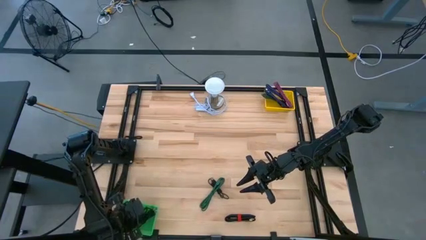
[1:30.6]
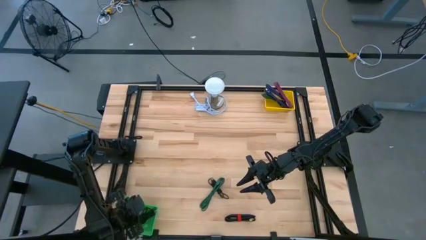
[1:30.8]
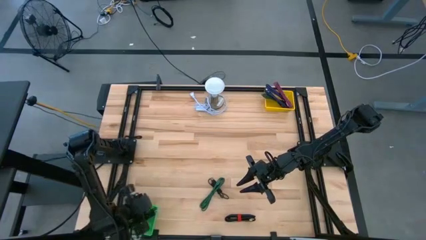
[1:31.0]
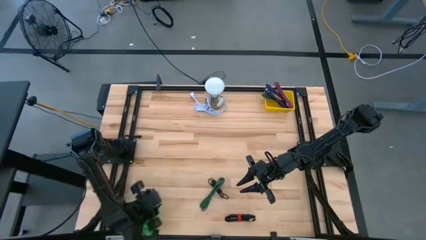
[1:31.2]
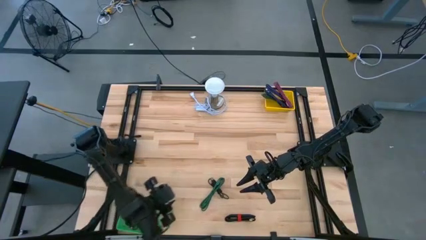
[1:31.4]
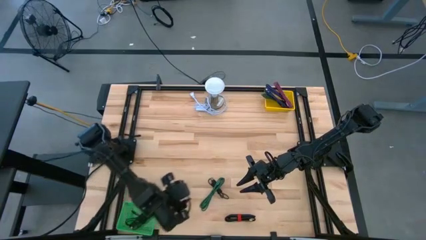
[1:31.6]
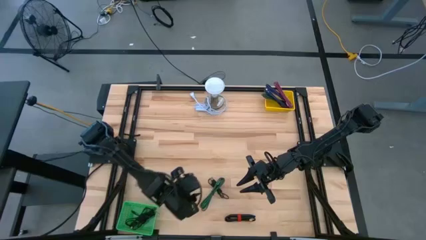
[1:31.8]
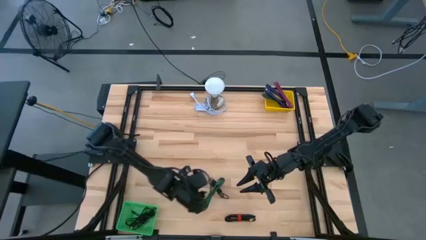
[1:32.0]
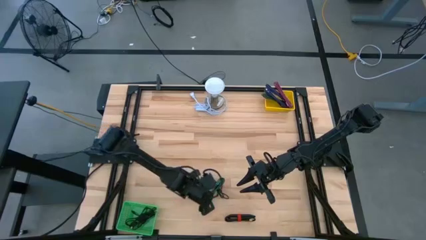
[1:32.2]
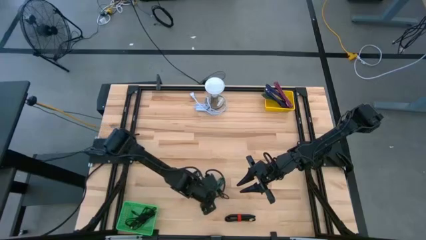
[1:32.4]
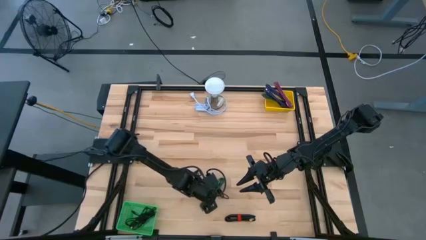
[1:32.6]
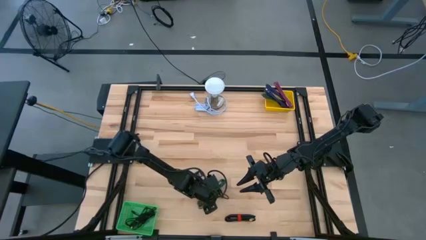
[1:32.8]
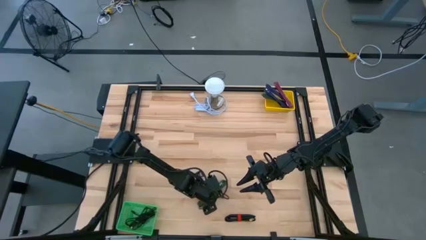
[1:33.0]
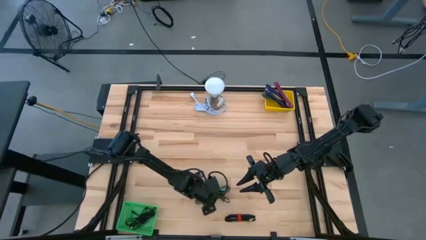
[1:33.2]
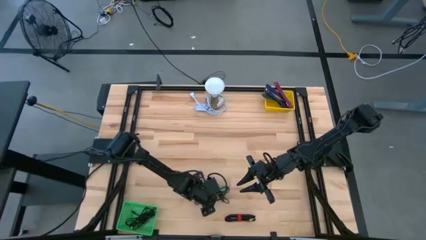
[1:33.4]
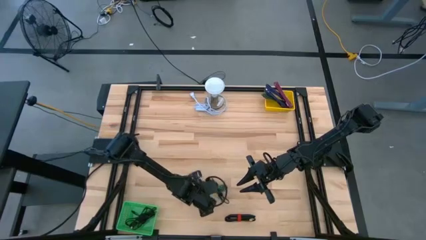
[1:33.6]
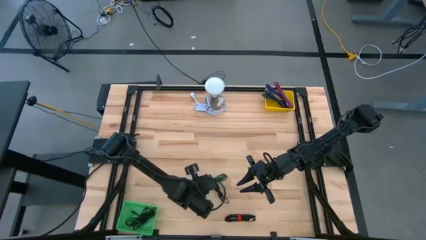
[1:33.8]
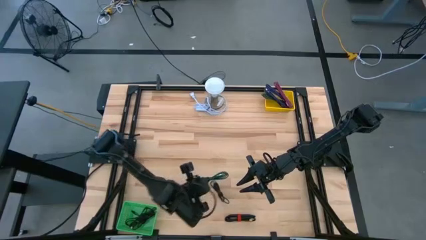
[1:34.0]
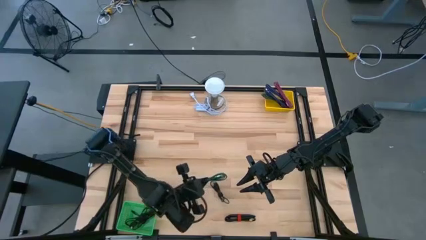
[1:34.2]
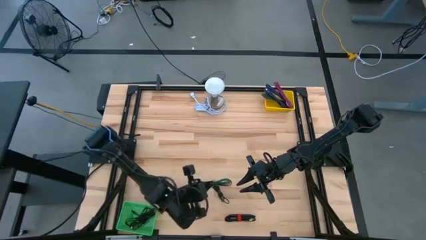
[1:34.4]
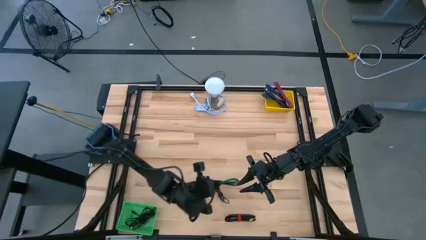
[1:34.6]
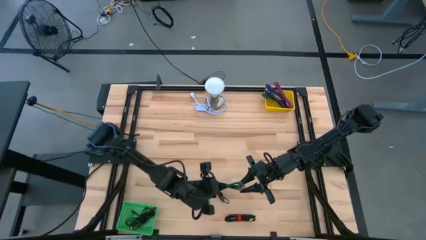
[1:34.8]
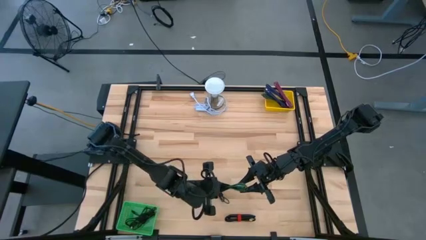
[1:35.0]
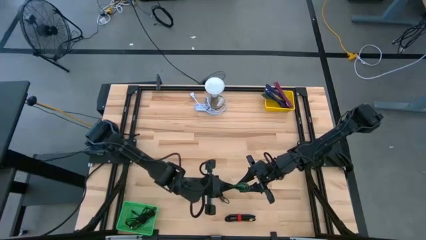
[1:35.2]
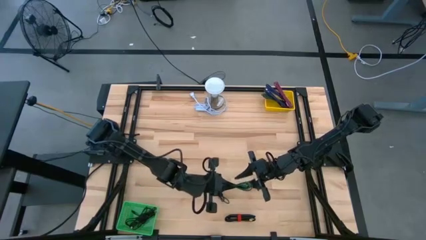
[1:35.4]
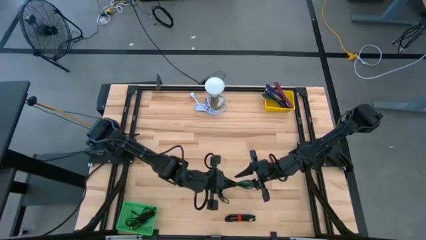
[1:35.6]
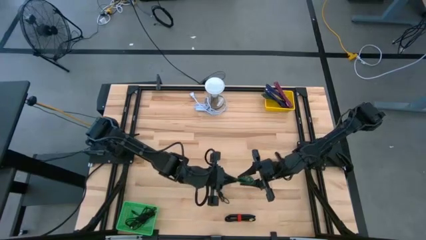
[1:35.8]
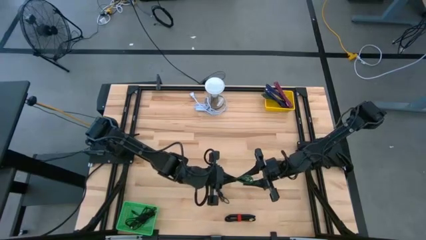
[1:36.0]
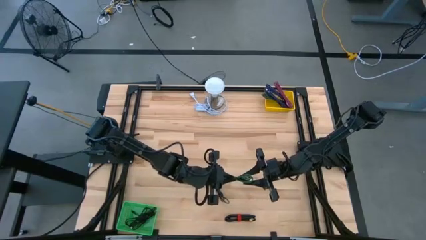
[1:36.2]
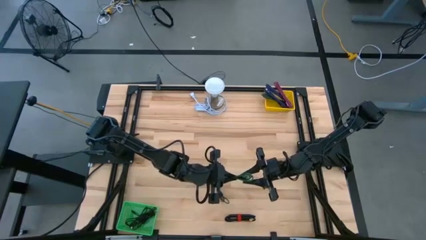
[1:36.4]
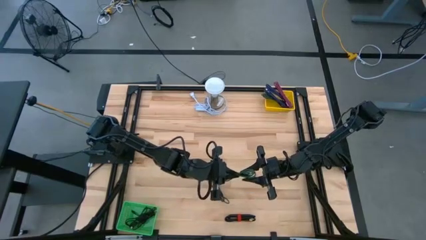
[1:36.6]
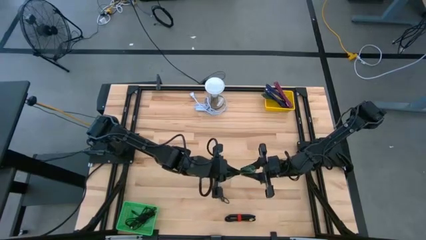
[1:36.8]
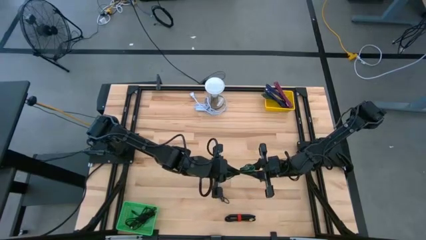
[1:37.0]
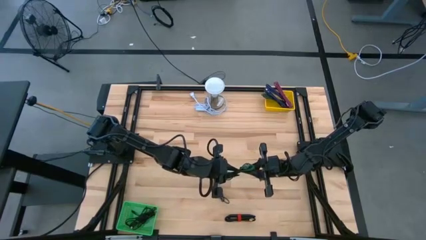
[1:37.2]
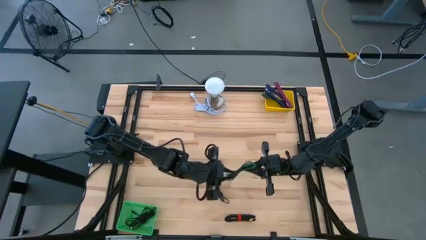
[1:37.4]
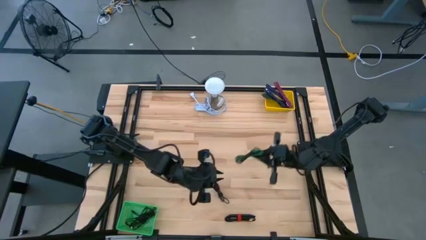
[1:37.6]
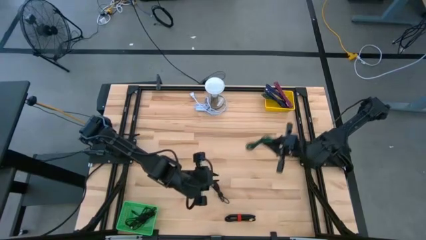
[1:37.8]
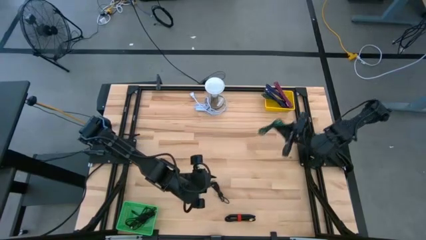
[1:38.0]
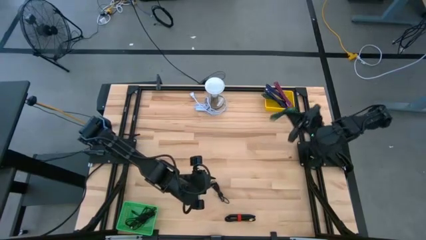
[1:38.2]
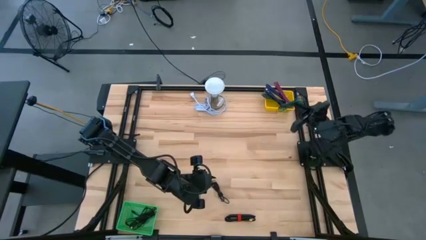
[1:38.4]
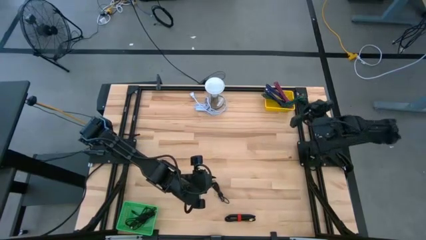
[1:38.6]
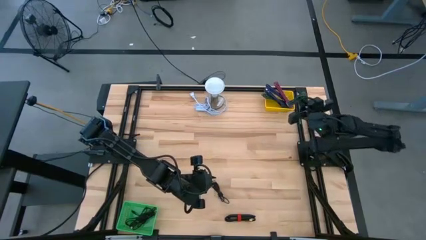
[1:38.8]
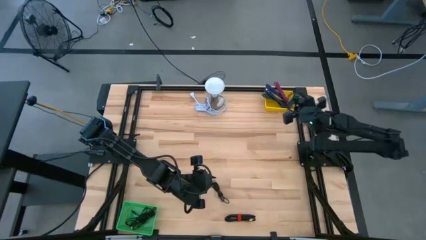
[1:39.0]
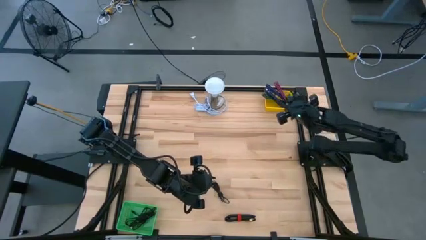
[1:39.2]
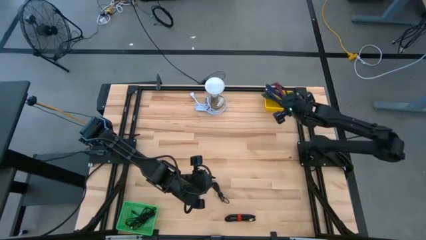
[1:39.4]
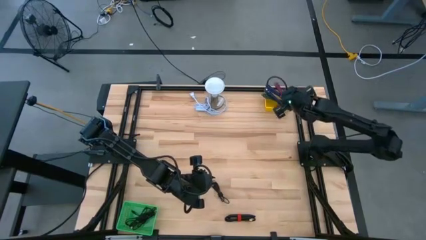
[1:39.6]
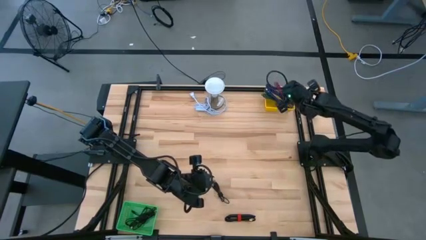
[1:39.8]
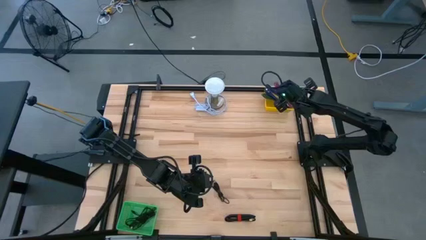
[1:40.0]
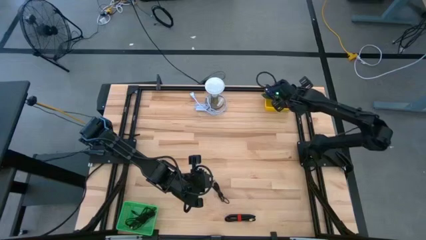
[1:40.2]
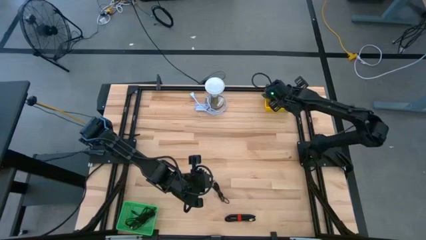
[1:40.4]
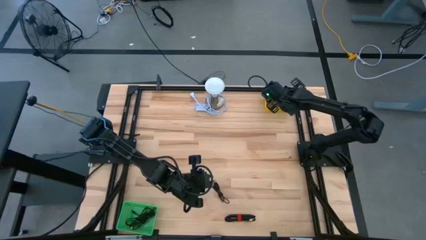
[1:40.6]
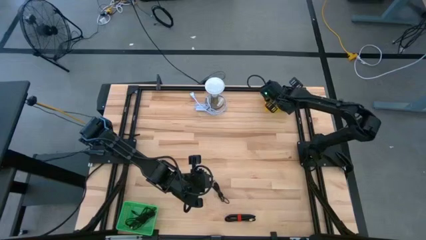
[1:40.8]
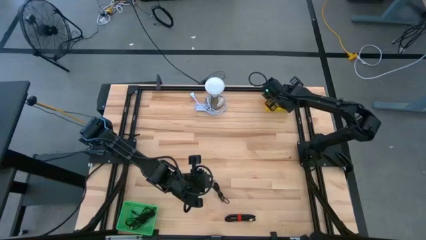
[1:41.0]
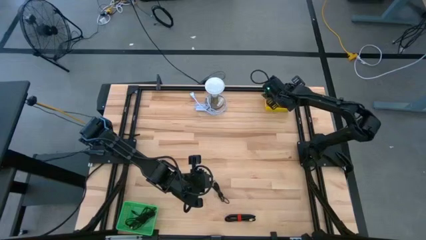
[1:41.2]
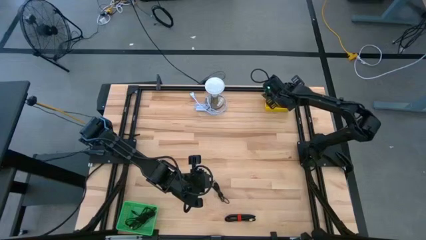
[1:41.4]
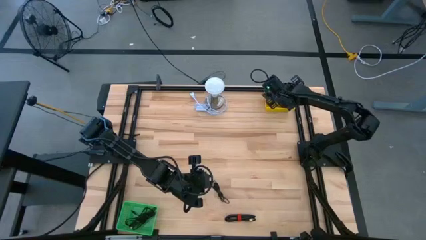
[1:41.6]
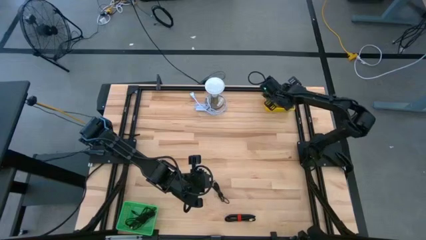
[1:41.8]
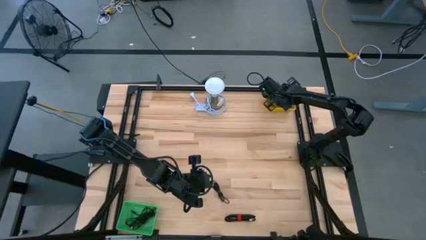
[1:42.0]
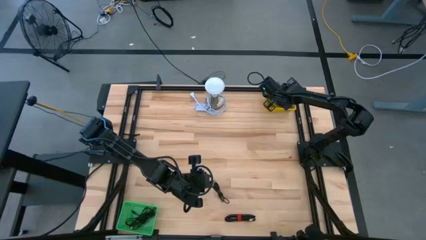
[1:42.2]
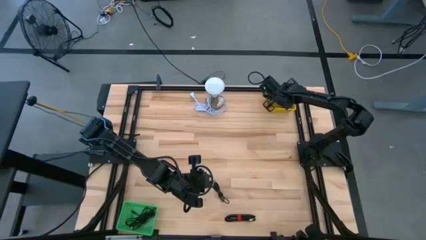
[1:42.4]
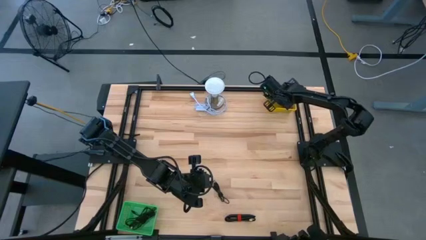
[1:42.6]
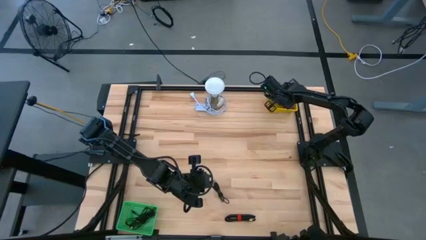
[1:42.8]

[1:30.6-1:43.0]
Task: Pick & Place USB Port
Put the green USB cable into the yellow bin
